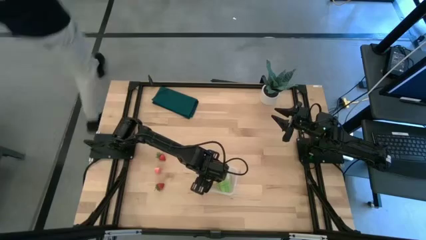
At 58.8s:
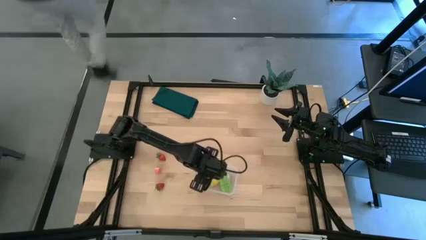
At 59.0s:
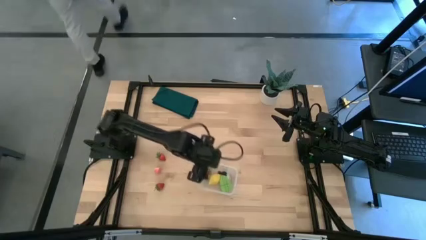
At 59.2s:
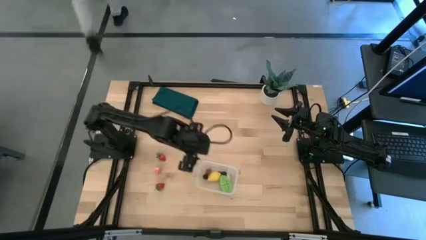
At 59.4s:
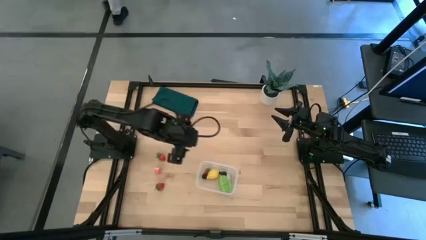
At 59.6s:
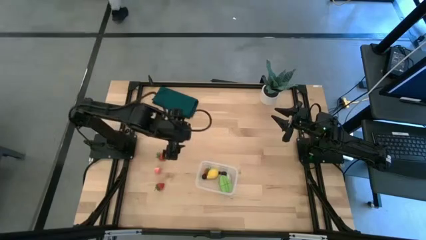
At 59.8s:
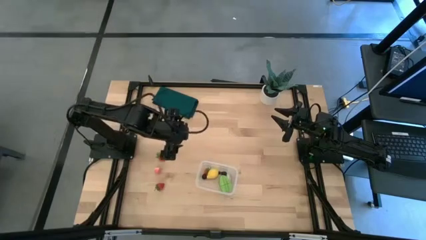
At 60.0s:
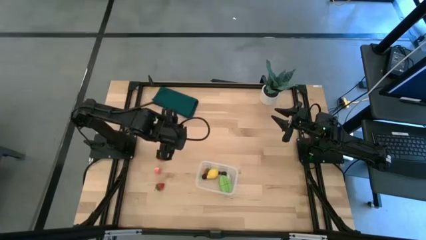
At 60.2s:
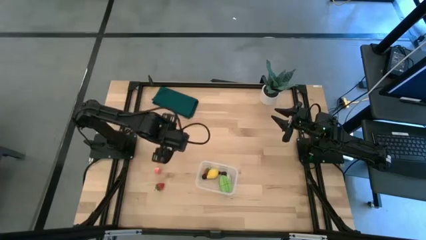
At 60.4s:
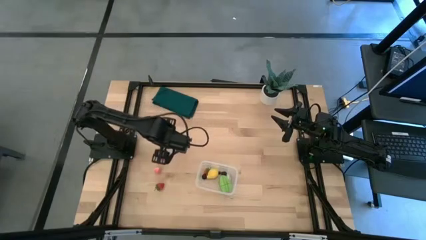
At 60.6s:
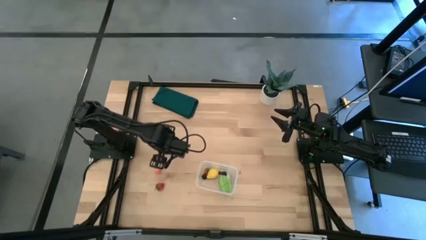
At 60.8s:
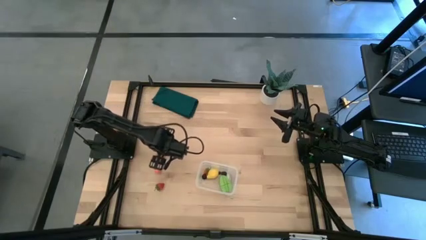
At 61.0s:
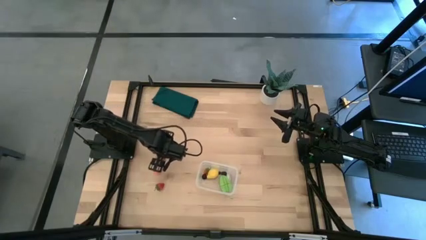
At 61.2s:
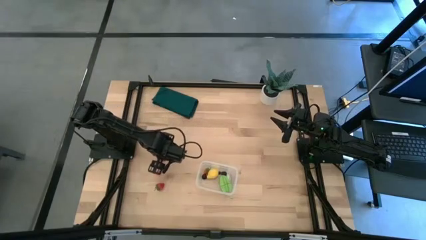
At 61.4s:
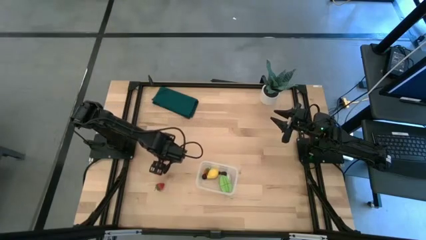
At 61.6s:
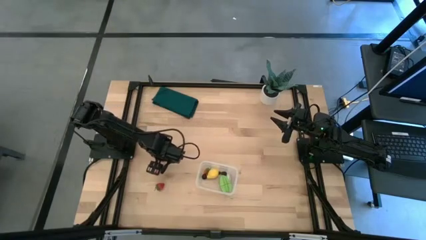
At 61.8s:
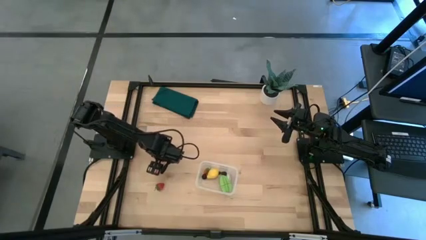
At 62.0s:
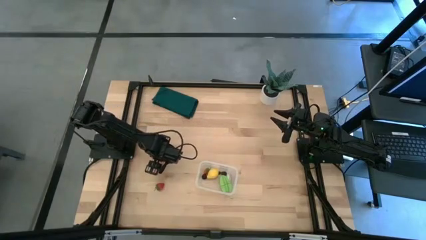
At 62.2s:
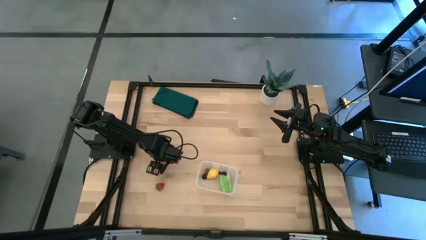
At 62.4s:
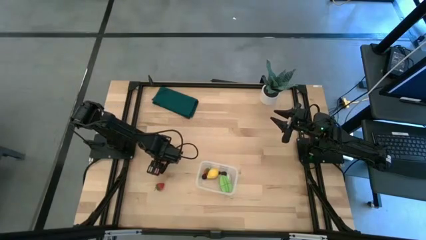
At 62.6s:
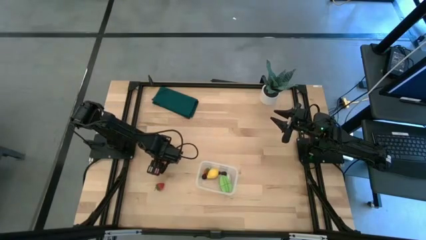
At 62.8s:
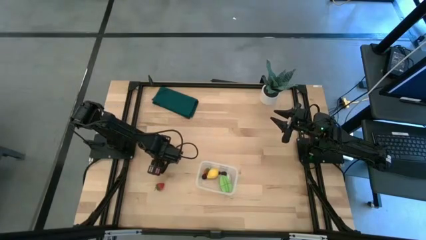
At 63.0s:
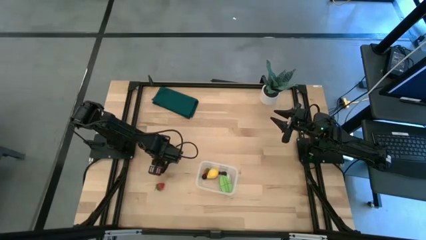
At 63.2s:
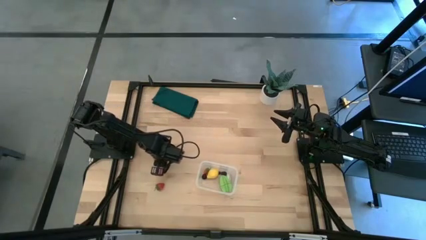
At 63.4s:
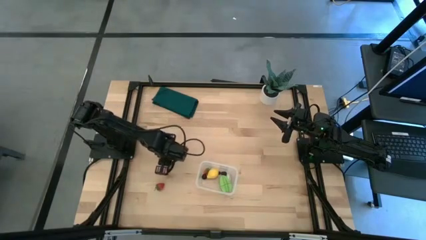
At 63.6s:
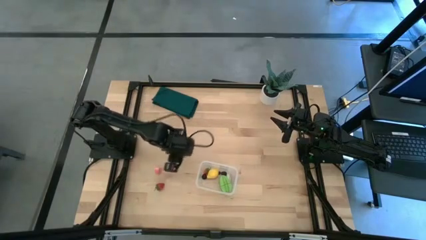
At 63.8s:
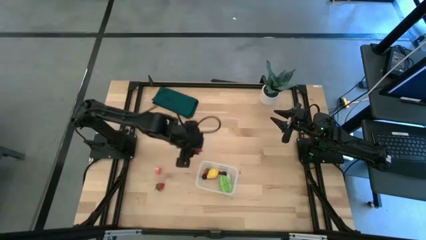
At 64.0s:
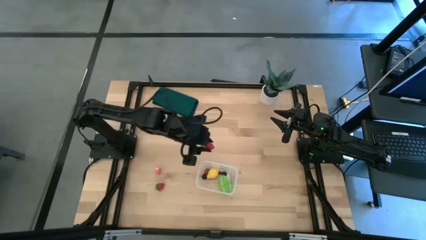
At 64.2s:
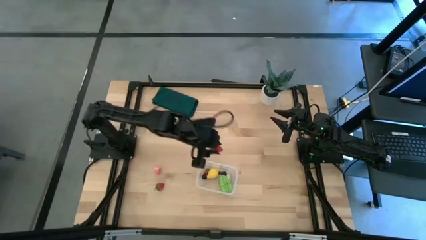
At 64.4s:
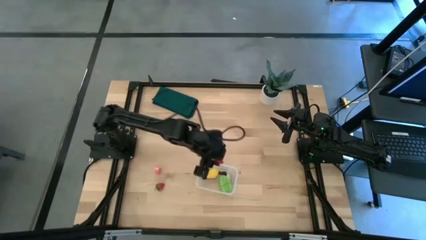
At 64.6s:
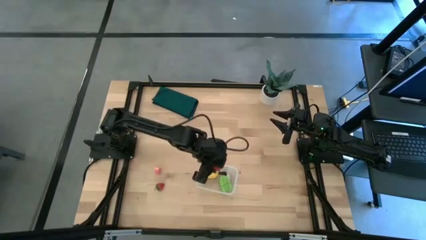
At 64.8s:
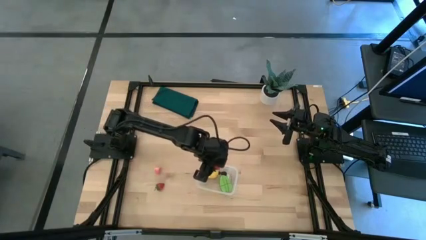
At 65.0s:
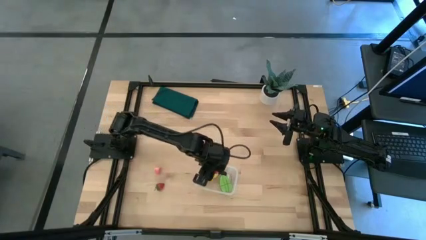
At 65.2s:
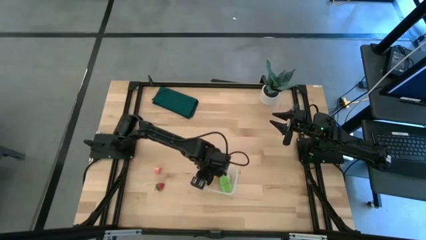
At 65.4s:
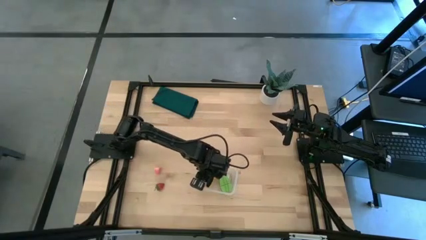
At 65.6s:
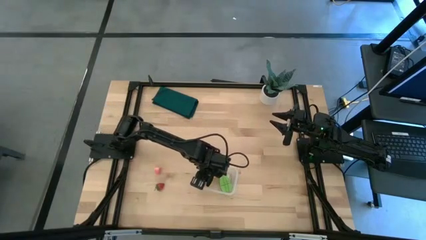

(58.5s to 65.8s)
Task: Pick and placing Produce into tupperware
Put the top strawberry into the transparent bin

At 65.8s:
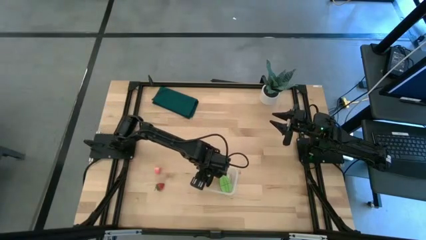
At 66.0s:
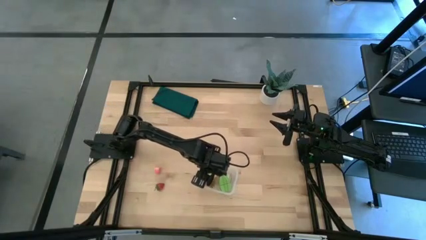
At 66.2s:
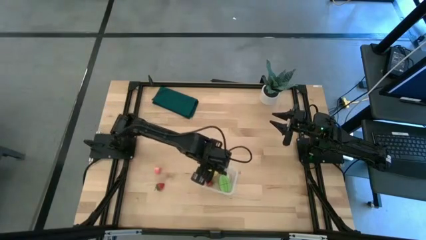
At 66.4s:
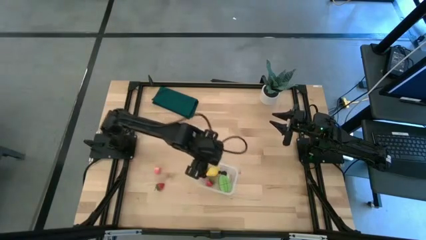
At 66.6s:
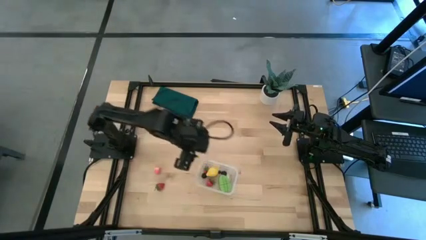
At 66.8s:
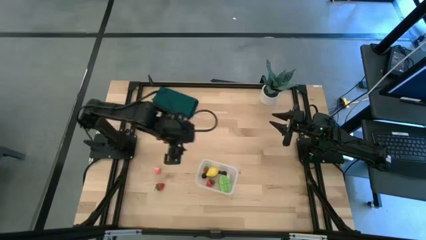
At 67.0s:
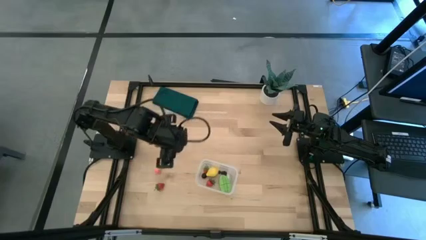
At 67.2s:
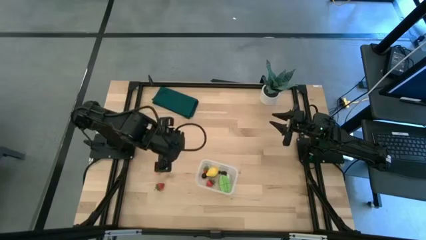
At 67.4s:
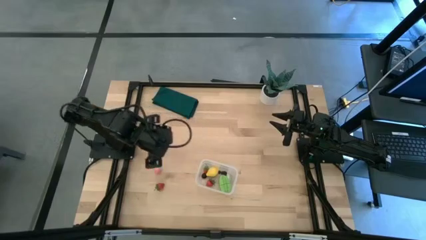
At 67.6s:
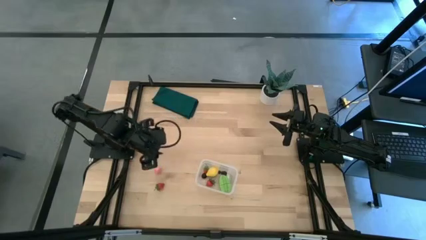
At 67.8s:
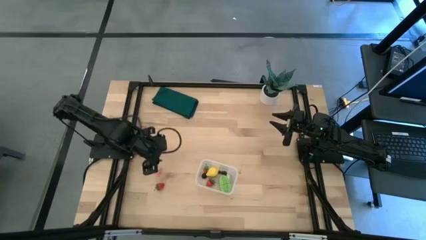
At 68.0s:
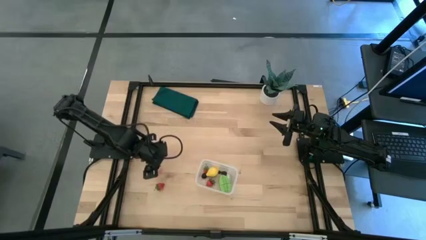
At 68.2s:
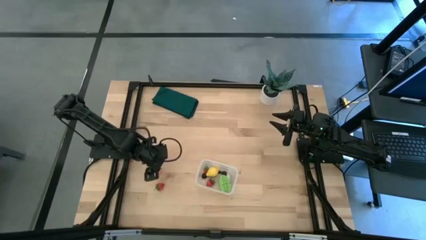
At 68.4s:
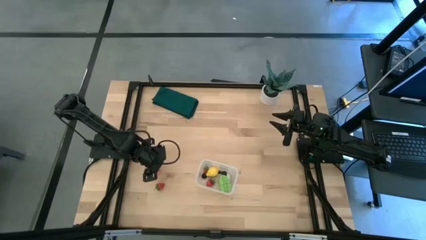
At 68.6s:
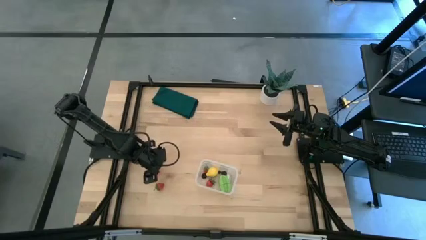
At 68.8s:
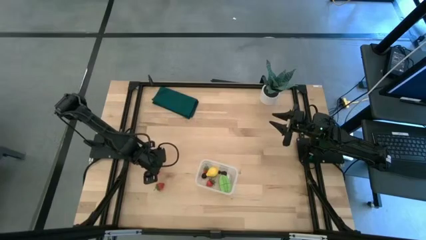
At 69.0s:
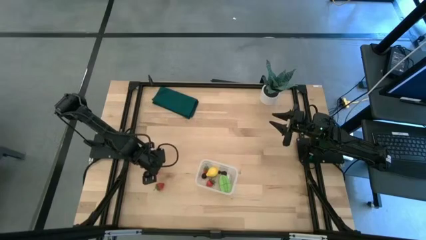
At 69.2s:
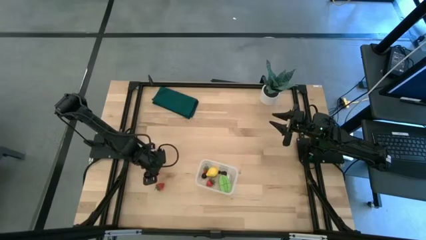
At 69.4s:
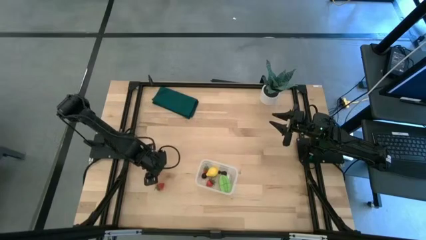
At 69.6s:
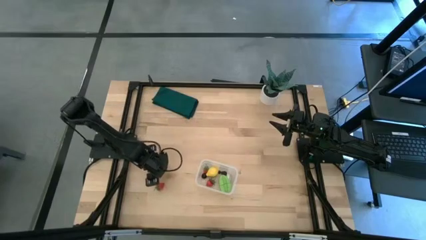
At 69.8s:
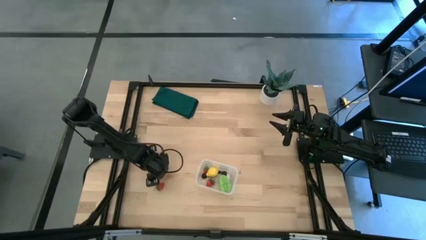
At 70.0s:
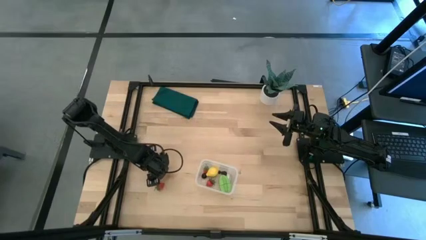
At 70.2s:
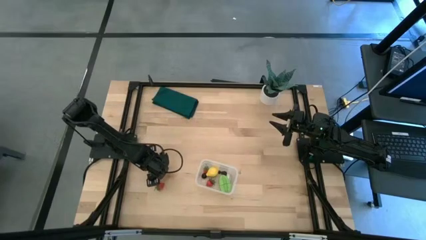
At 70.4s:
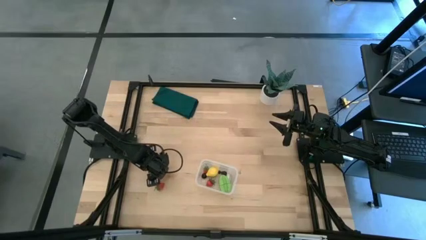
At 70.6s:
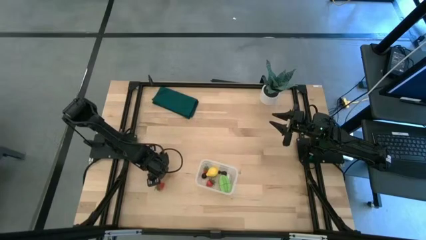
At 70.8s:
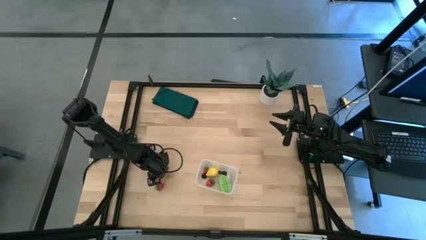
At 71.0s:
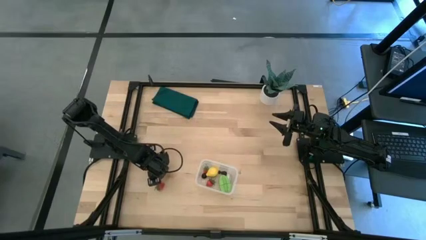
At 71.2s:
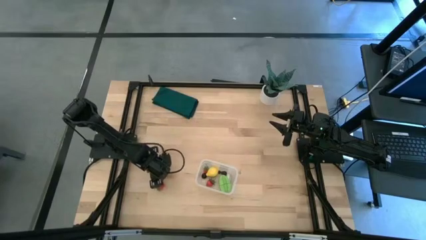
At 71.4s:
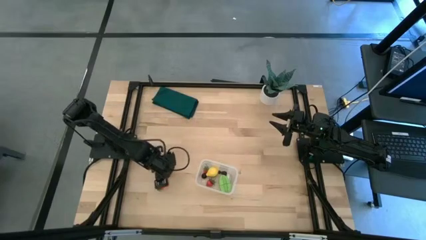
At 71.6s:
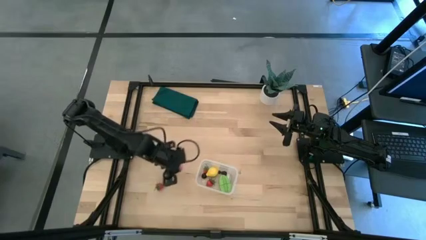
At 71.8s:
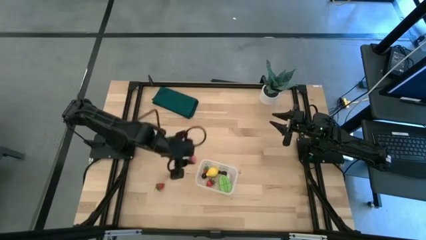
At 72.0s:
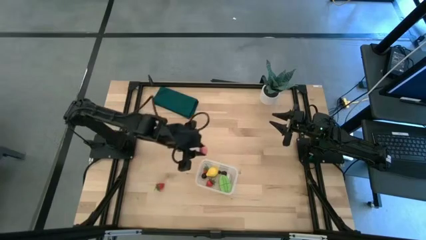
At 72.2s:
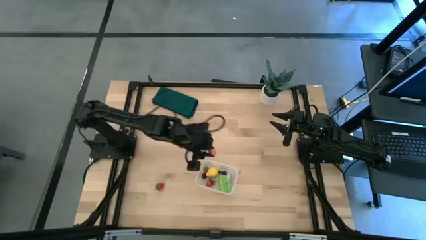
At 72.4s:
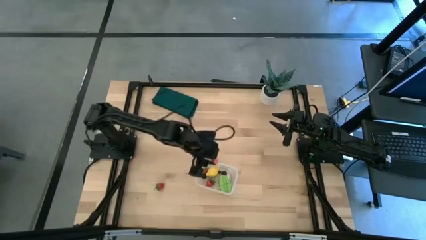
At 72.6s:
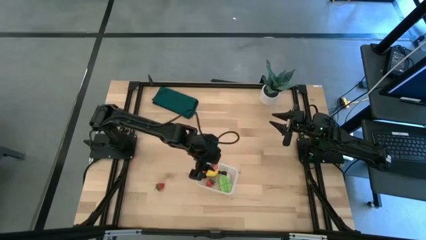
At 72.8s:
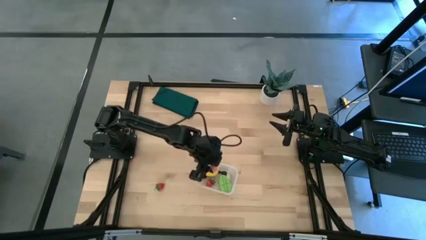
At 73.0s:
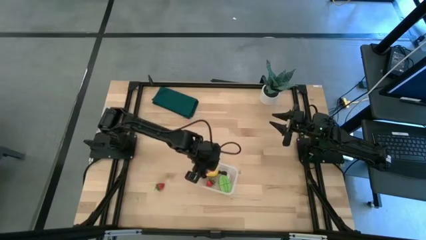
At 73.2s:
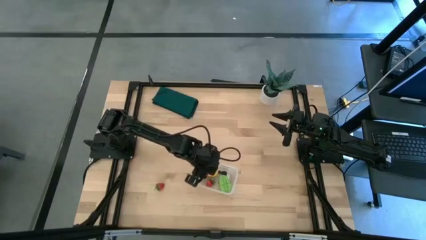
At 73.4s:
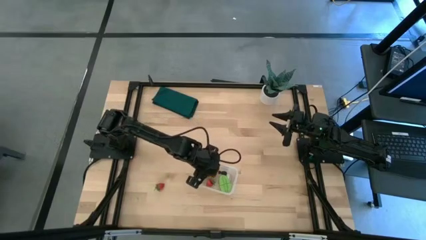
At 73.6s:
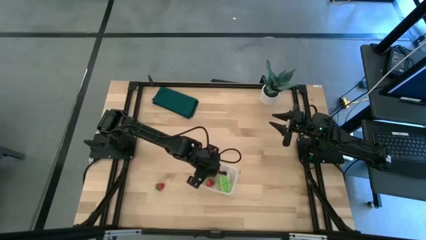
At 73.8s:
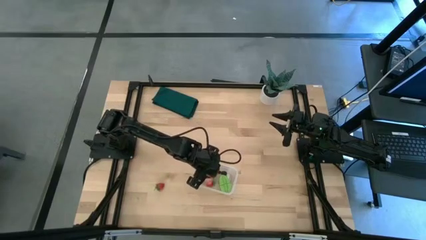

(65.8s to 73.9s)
Put the peach into the transparent bin

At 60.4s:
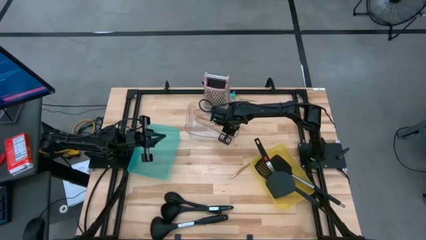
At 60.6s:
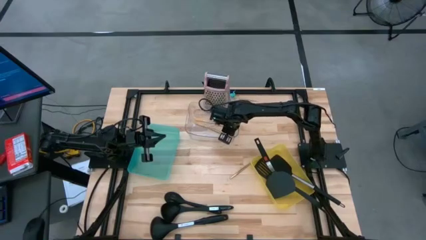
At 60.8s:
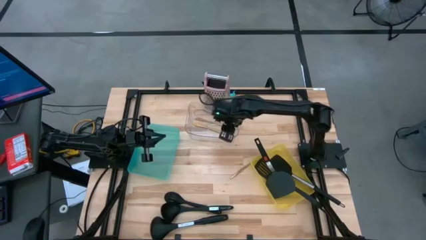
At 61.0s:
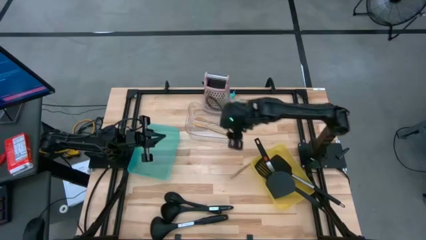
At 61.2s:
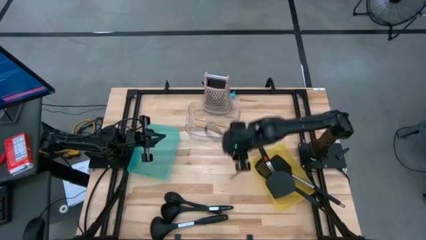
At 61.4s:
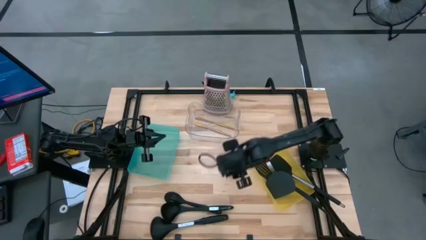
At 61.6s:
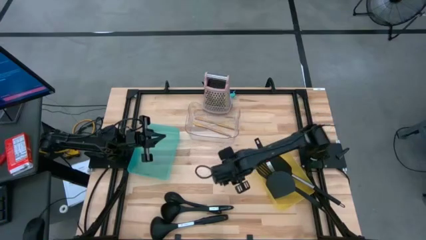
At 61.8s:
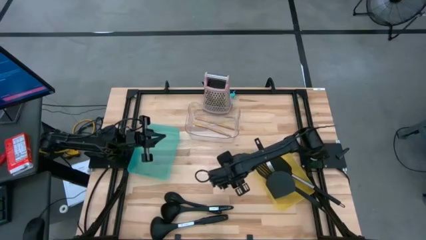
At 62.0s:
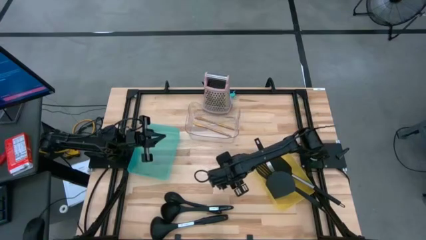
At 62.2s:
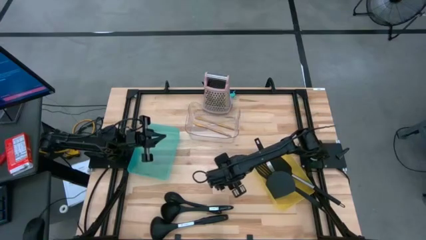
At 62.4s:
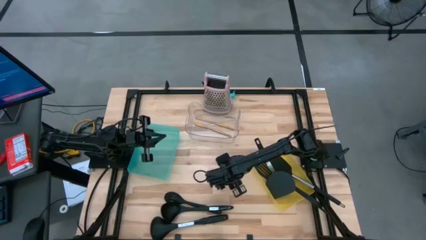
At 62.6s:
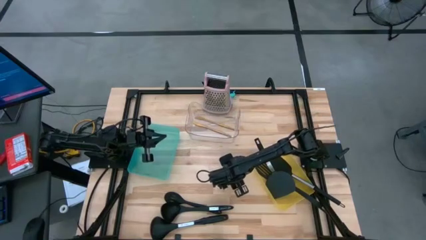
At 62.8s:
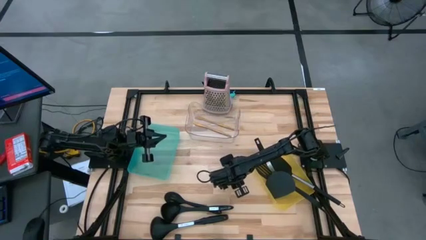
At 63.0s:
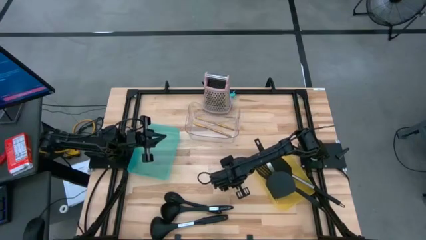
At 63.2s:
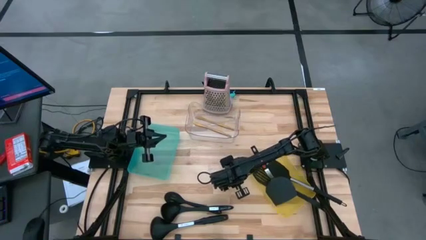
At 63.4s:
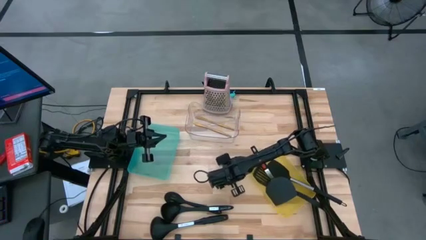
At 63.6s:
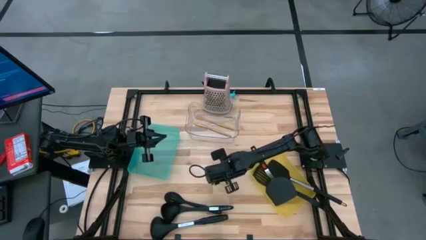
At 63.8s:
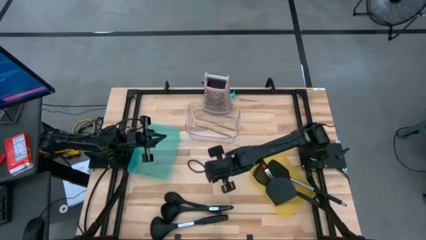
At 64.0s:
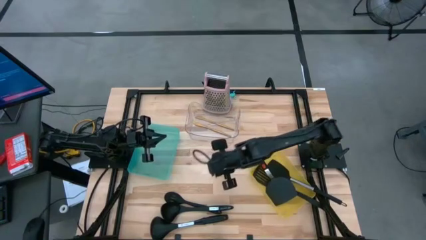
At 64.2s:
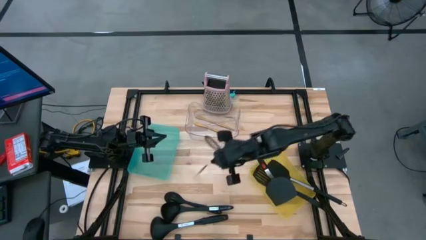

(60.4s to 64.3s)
Task: Pick & Place Kitchen Items
Put the gold knife into the transparent bin
